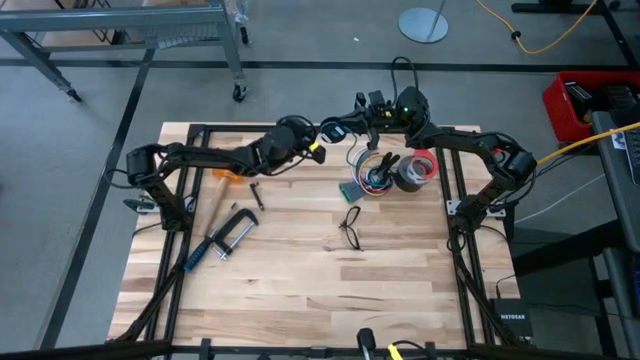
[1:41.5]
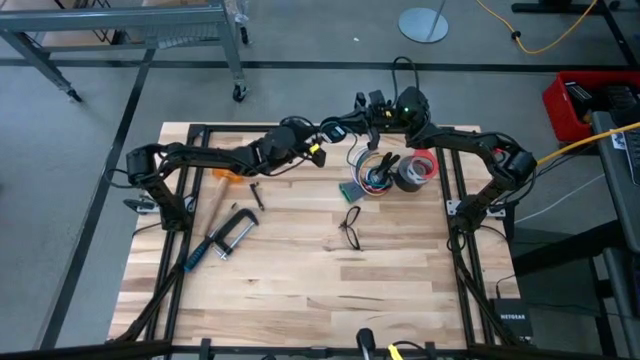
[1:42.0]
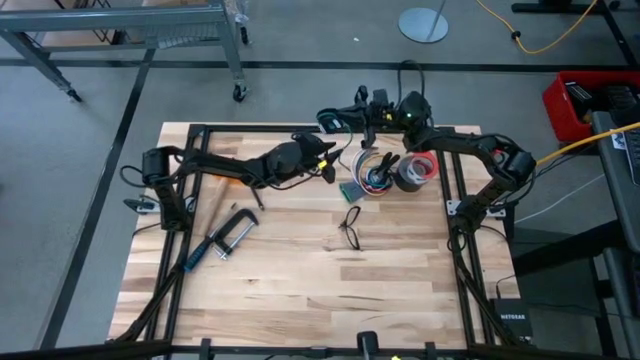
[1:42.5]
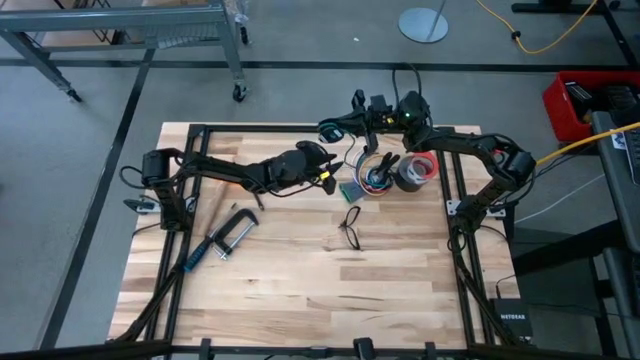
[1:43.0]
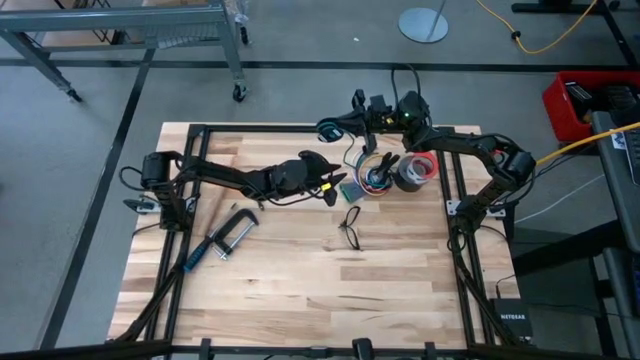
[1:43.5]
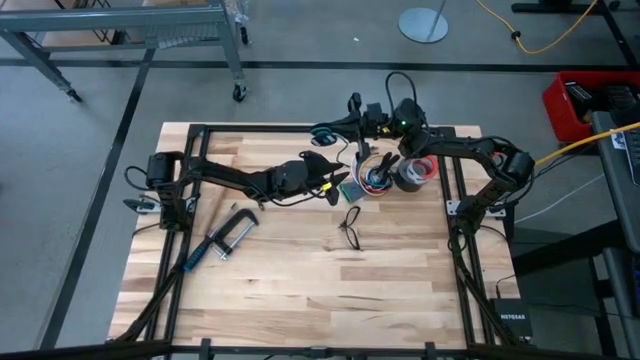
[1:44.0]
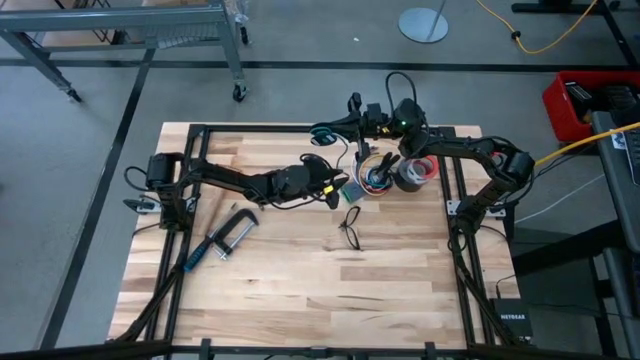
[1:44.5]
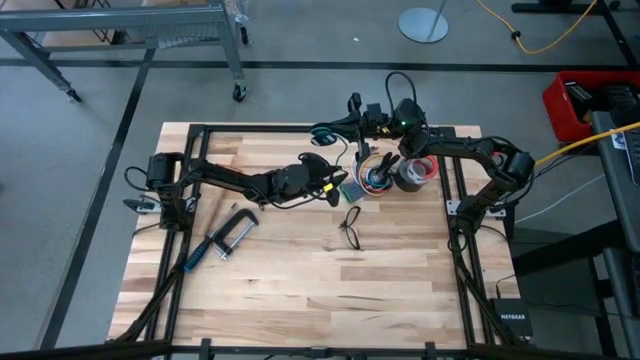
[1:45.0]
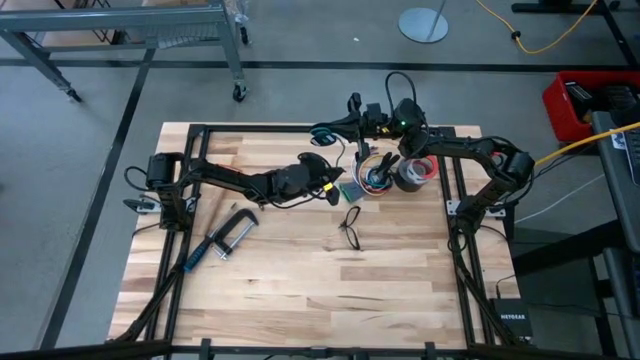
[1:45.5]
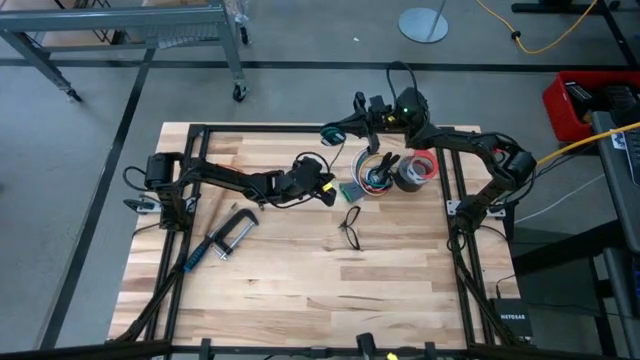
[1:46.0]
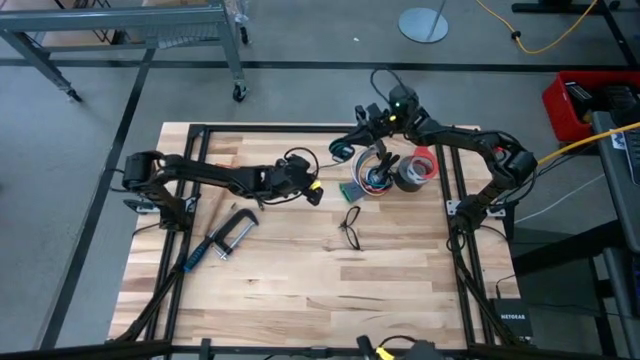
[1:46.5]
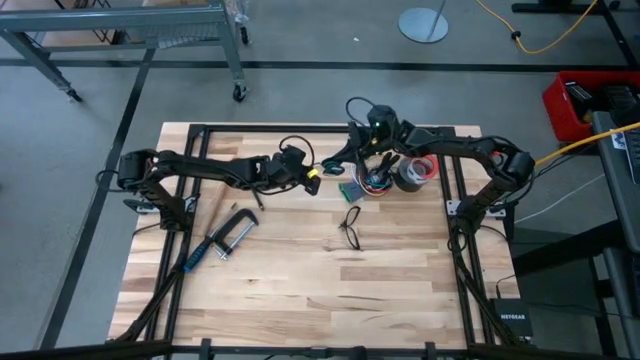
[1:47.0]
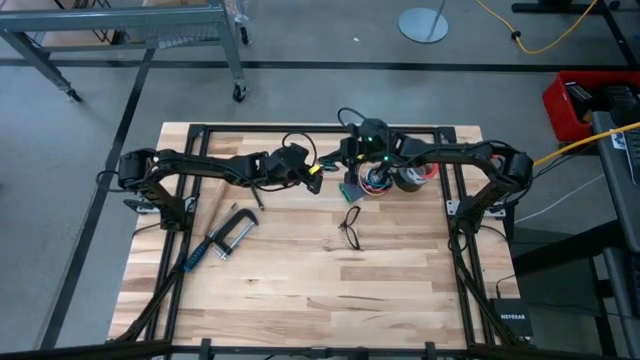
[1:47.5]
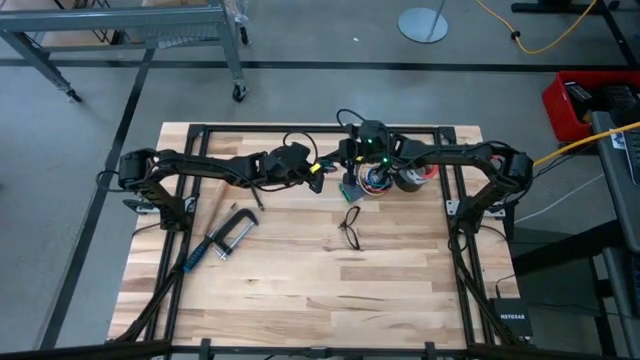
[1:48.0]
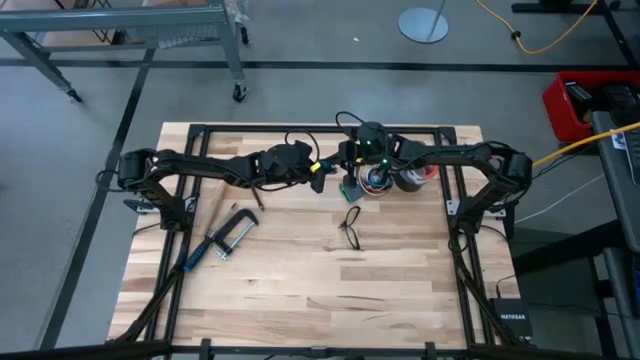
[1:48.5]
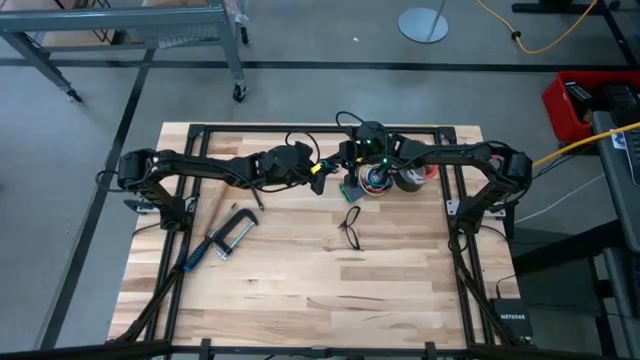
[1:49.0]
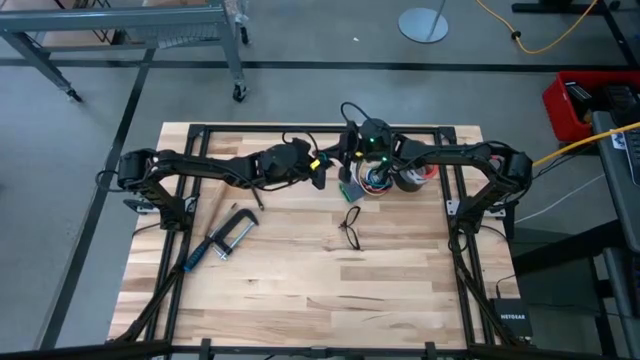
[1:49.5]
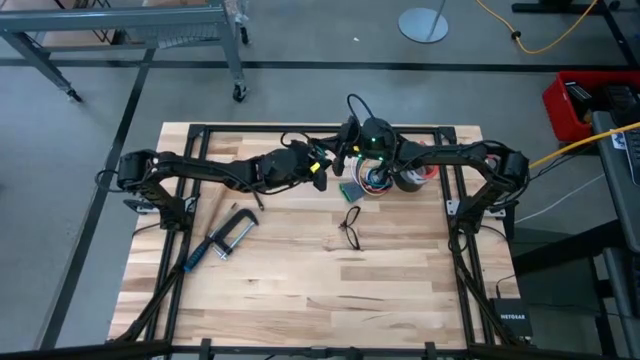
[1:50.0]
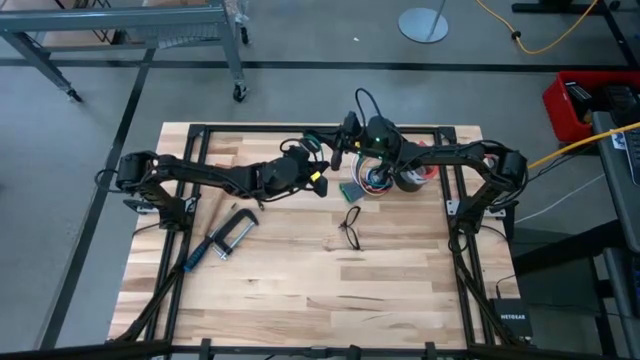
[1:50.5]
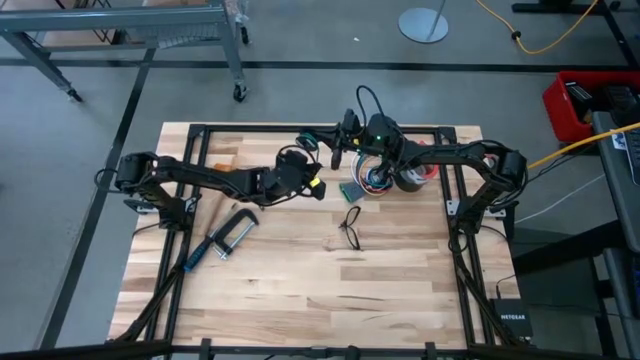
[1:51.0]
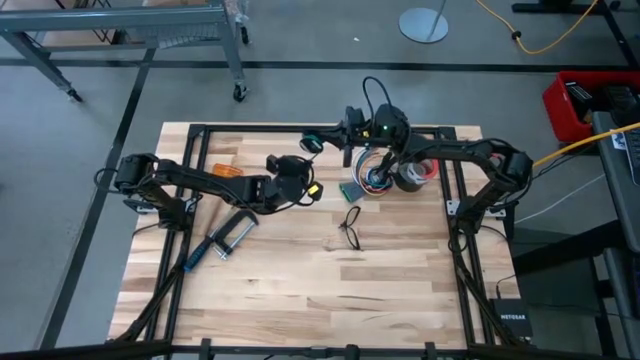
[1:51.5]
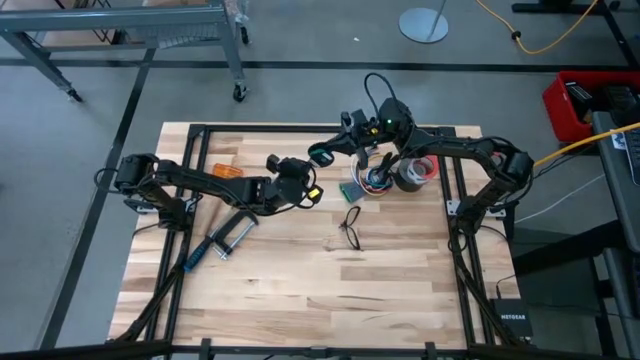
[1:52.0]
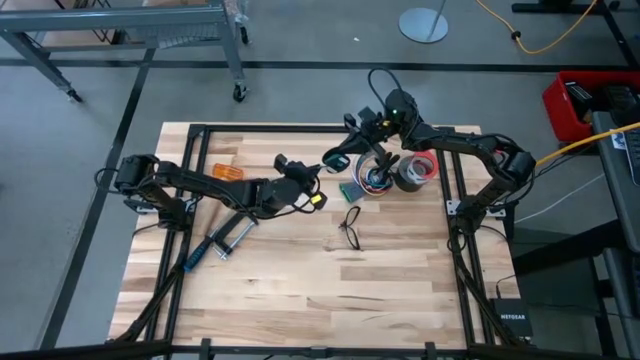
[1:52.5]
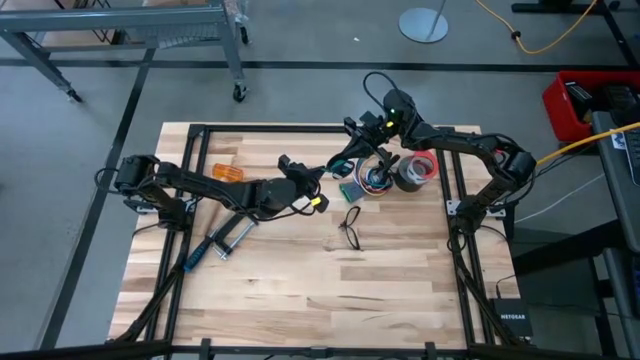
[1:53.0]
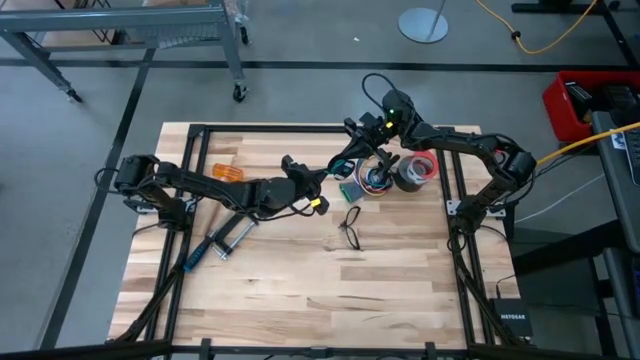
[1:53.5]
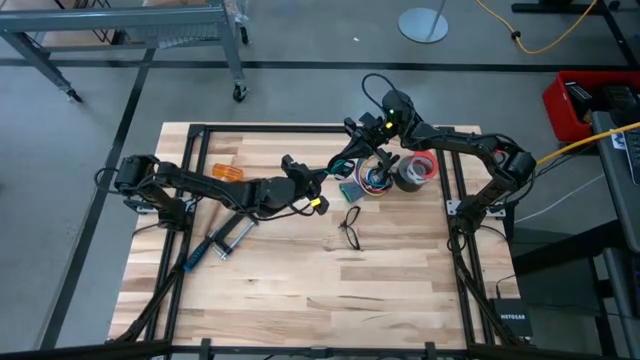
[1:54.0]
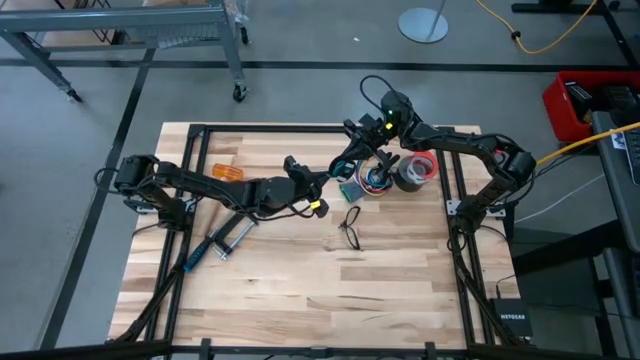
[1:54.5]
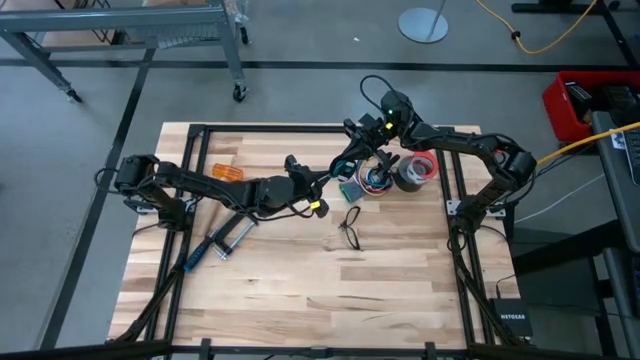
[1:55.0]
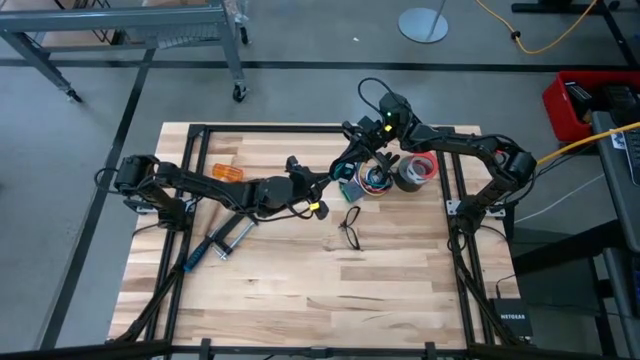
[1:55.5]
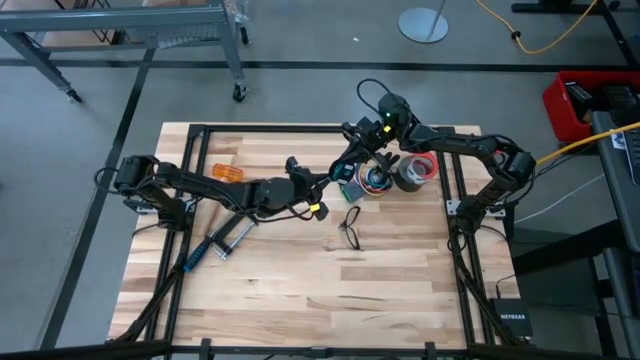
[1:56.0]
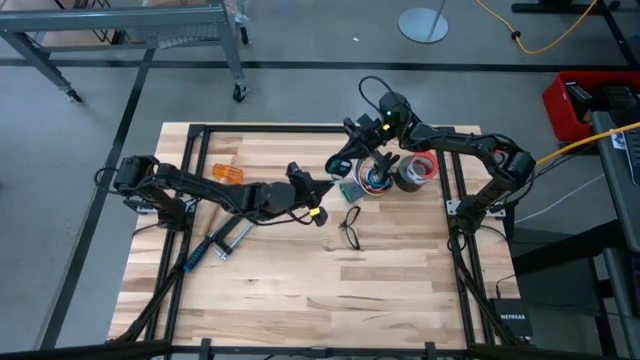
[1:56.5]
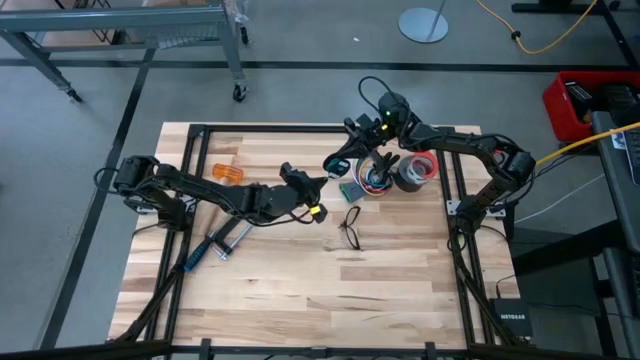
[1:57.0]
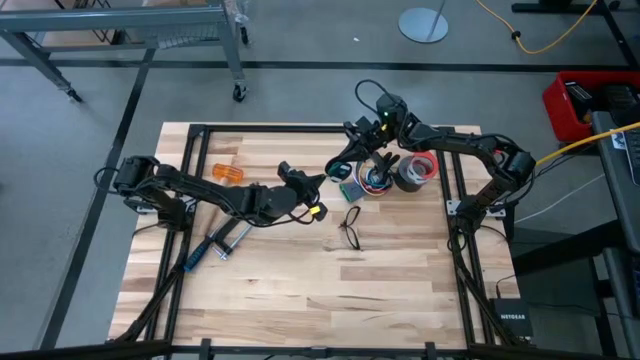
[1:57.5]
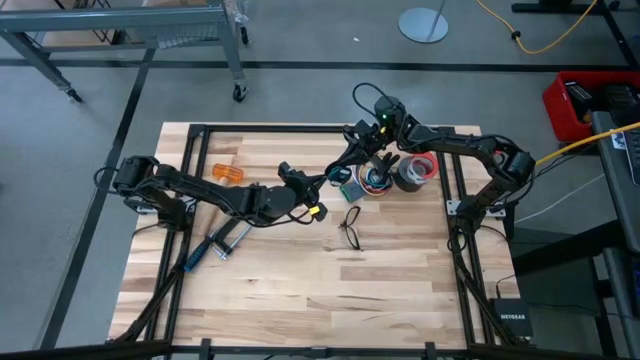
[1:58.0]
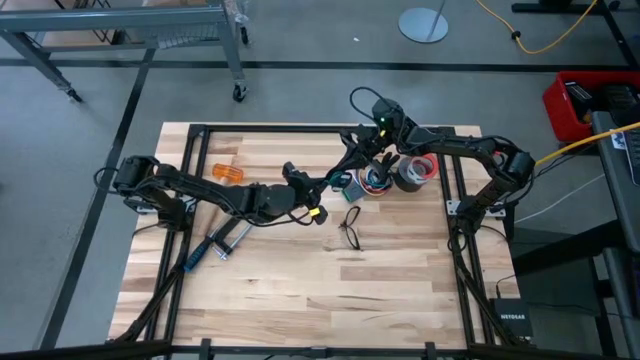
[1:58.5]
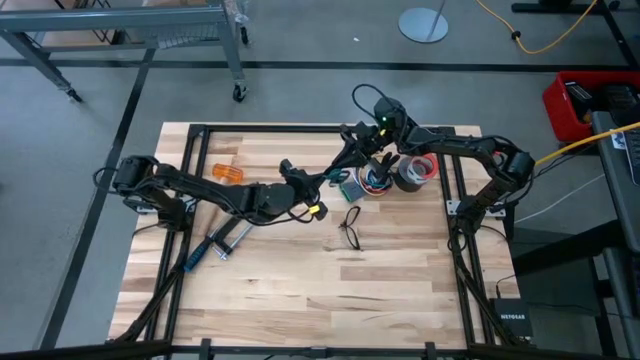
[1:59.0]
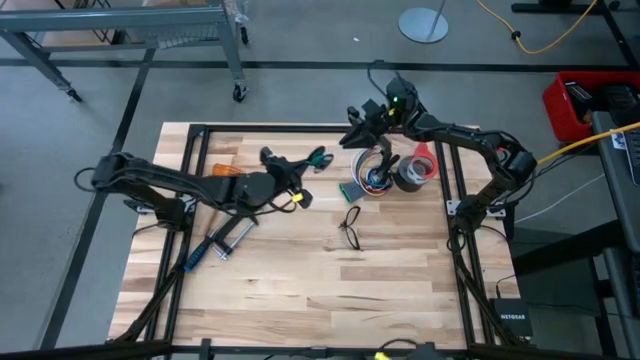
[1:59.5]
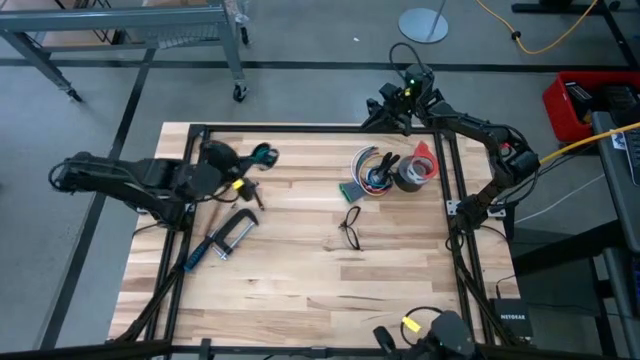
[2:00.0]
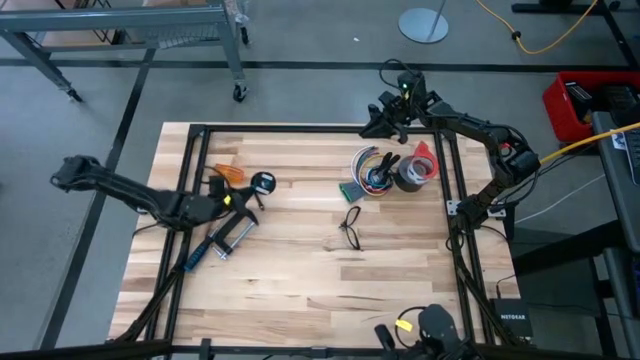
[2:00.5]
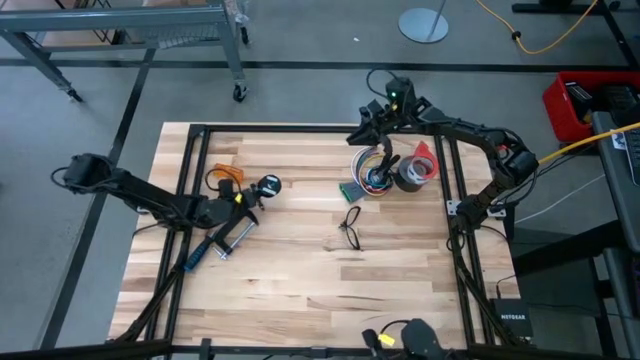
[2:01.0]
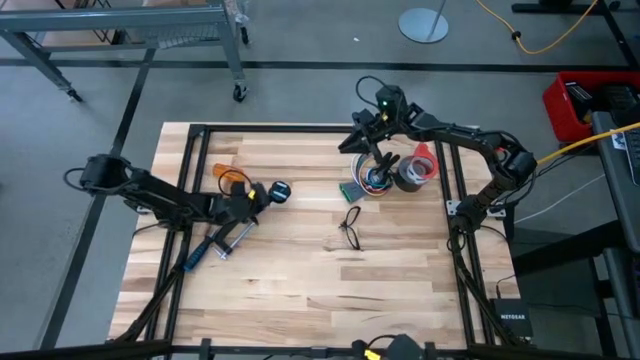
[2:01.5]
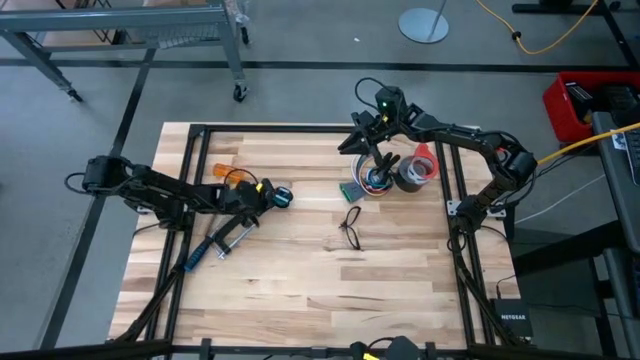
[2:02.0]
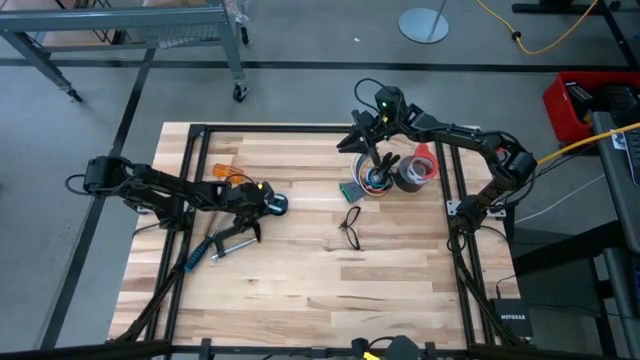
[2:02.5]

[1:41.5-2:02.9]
Task: Coil cords
Coil the green wire on the black spool
